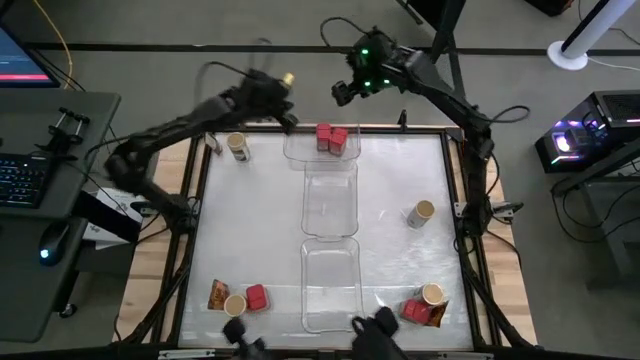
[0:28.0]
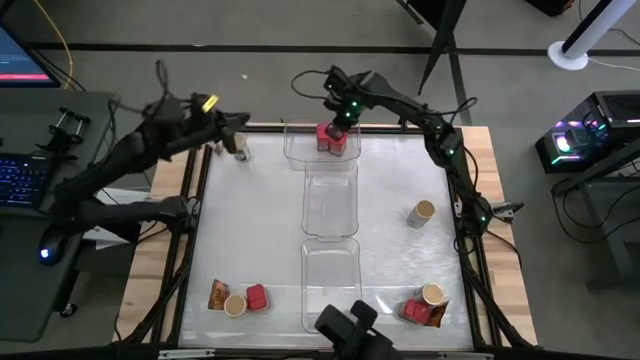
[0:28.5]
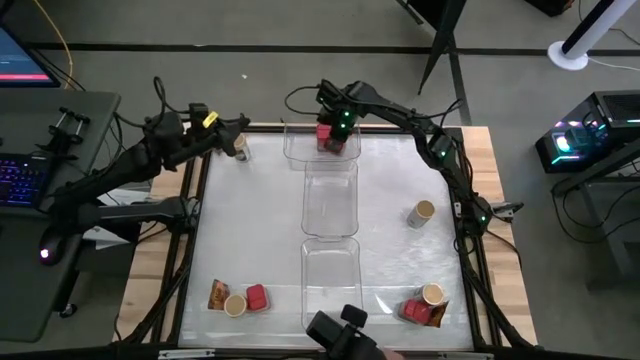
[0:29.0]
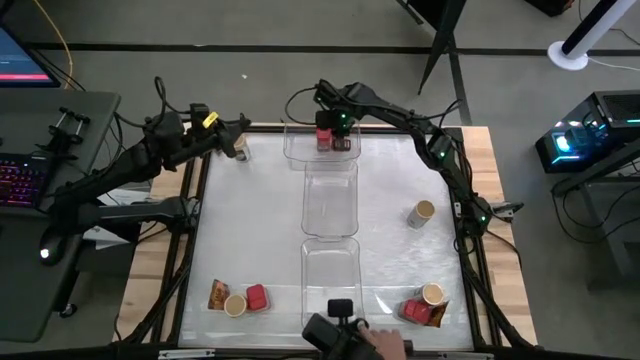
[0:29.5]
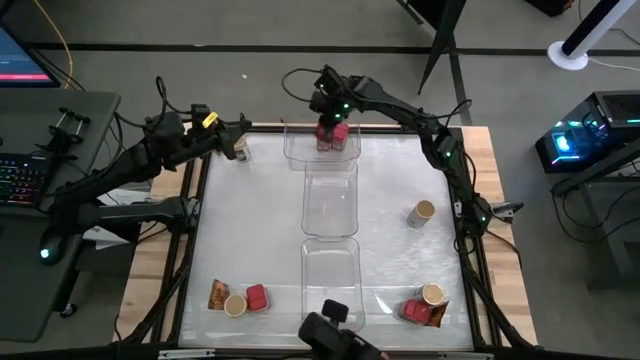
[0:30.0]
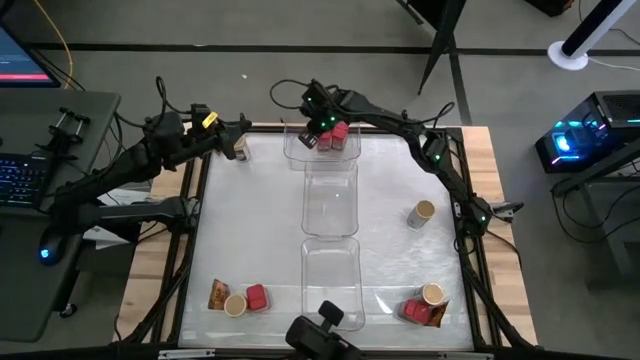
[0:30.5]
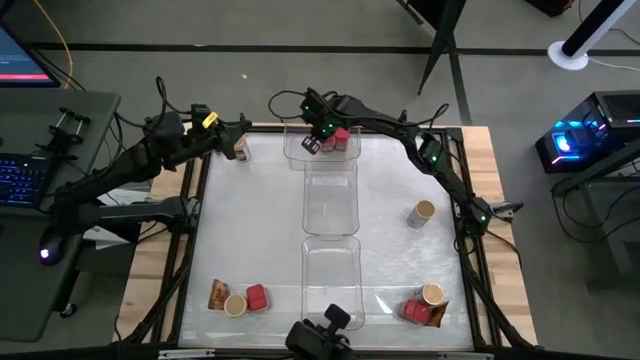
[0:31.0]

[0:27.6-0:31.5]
Task: Sort spices by type
Adjust the red seasoning cans in the top transparent bin

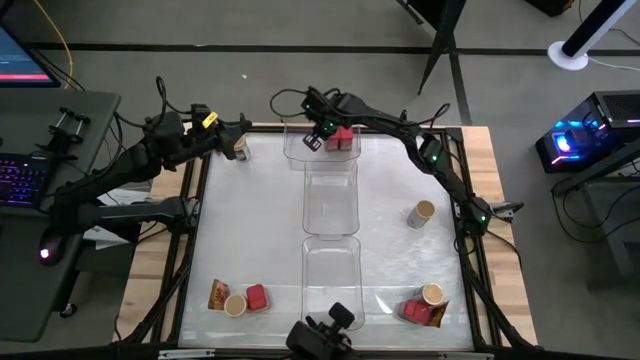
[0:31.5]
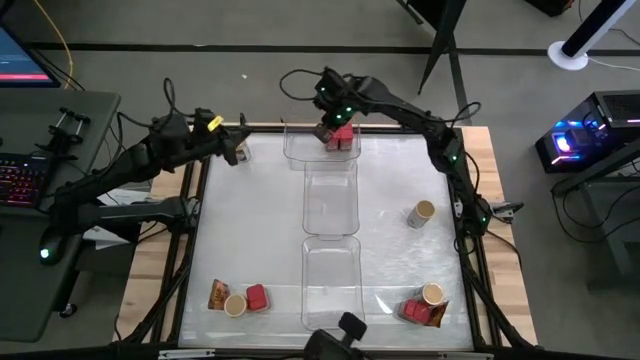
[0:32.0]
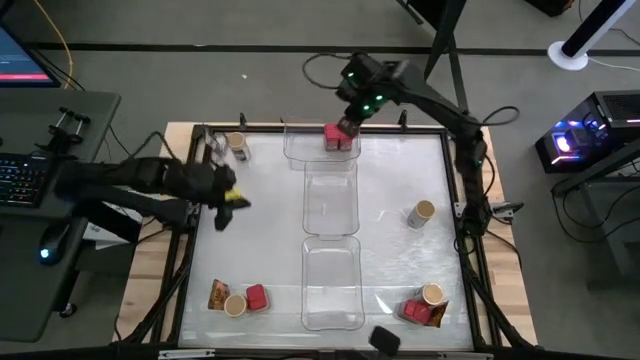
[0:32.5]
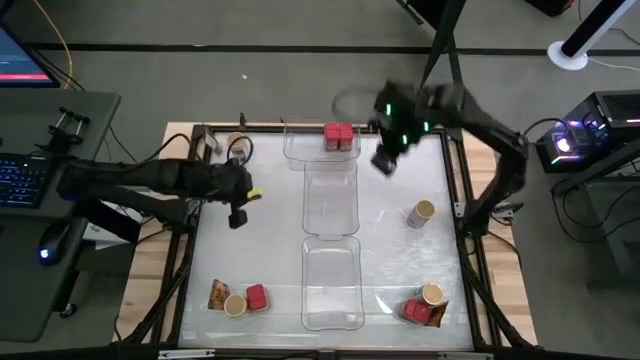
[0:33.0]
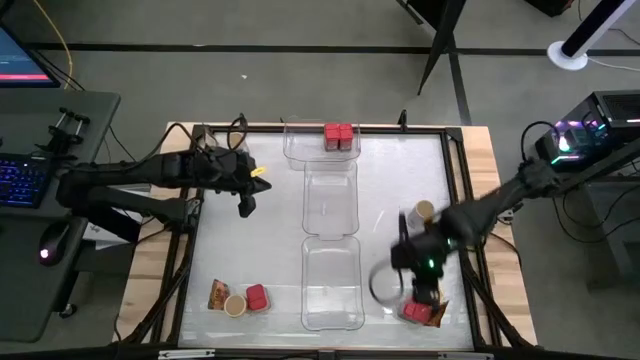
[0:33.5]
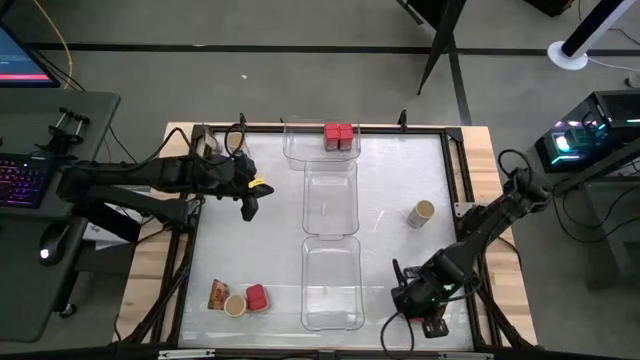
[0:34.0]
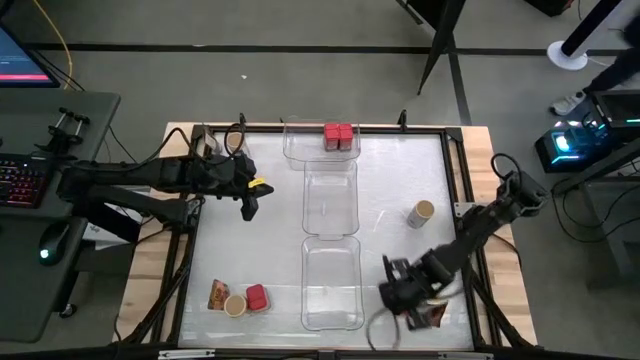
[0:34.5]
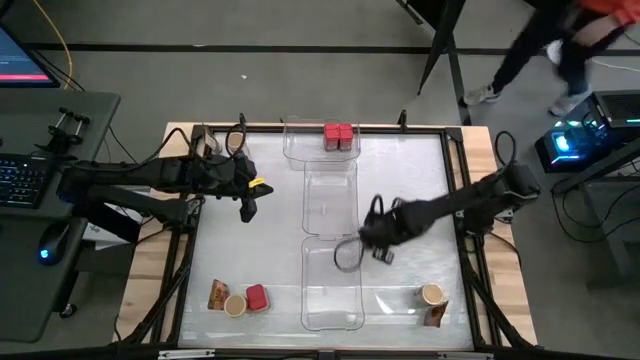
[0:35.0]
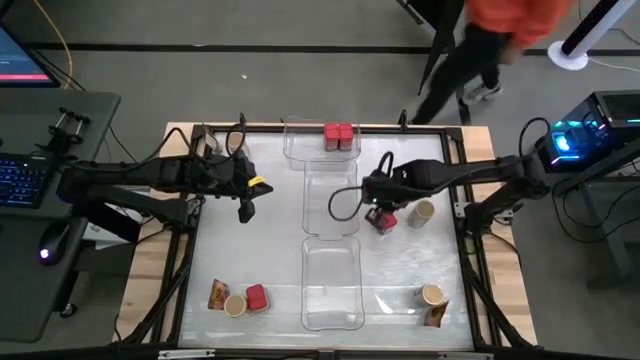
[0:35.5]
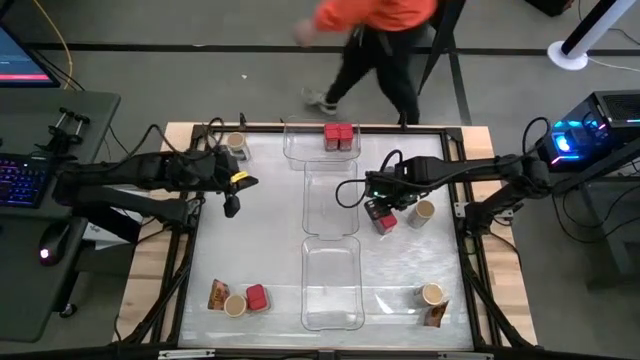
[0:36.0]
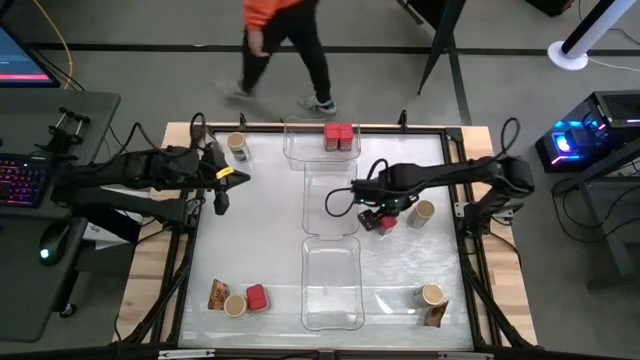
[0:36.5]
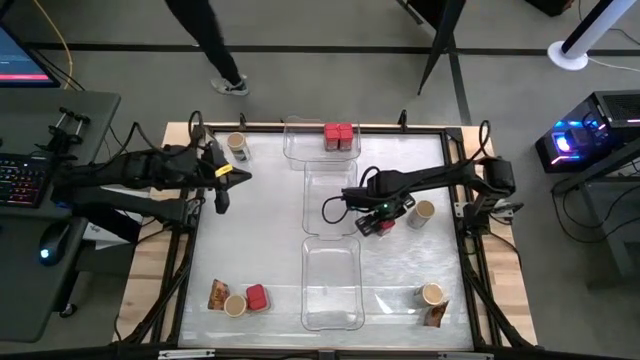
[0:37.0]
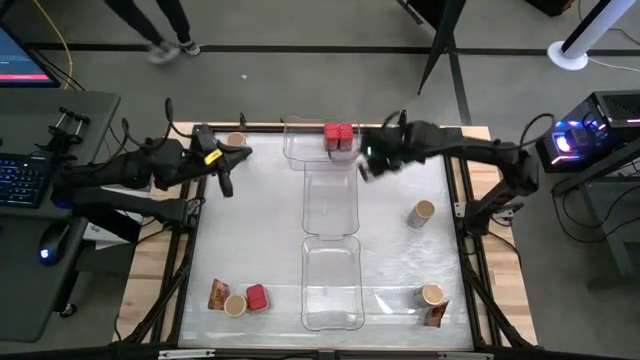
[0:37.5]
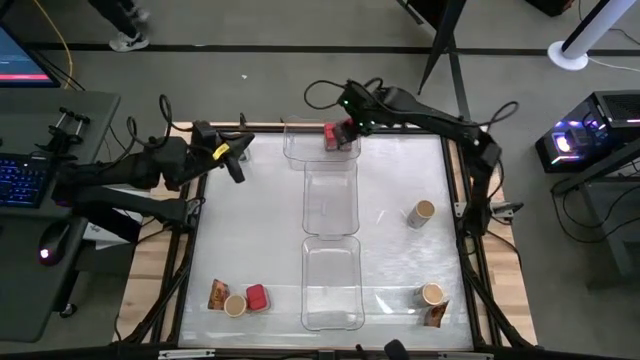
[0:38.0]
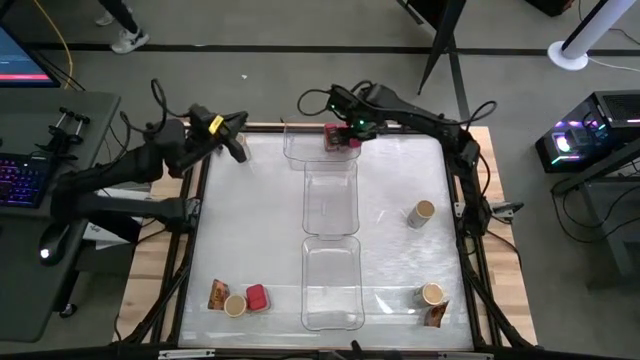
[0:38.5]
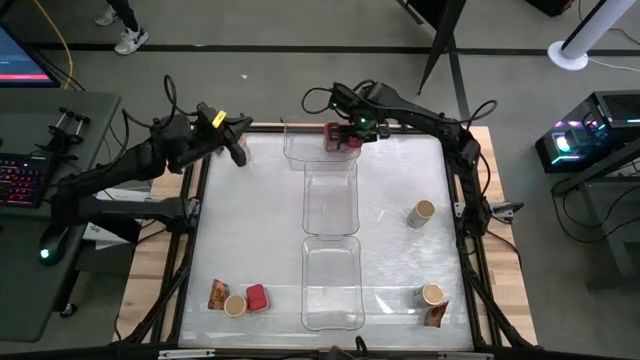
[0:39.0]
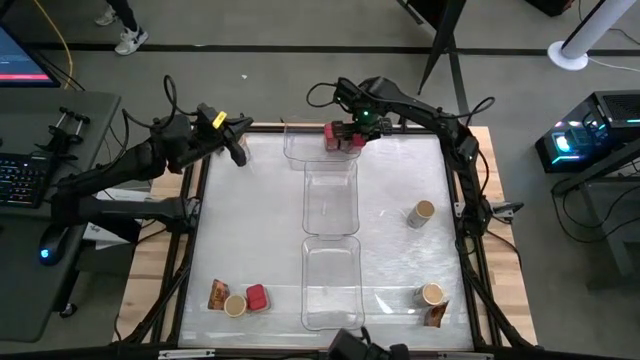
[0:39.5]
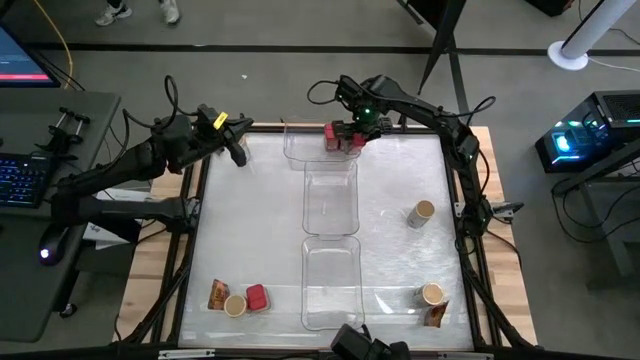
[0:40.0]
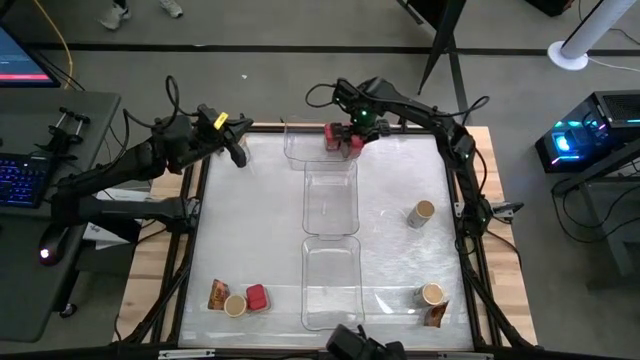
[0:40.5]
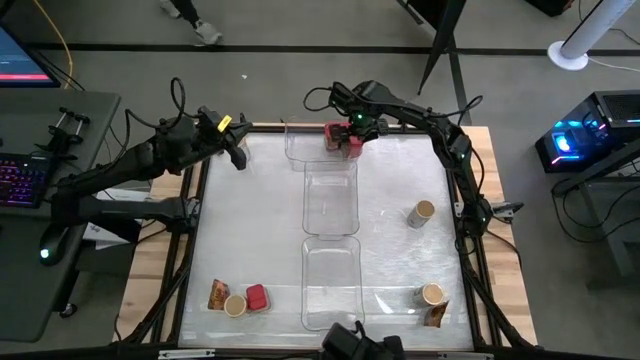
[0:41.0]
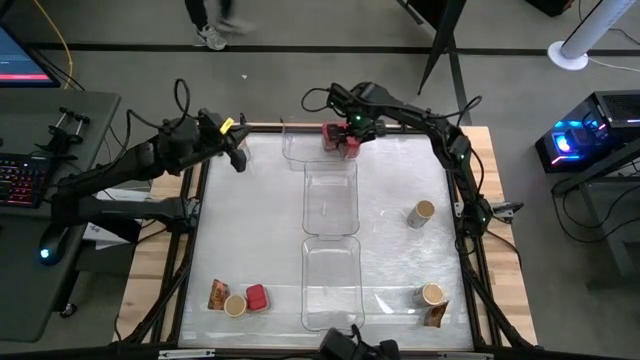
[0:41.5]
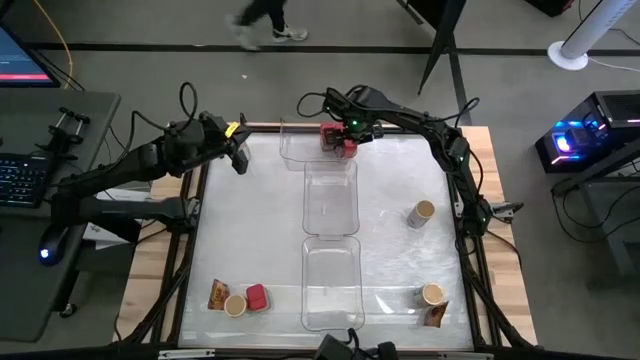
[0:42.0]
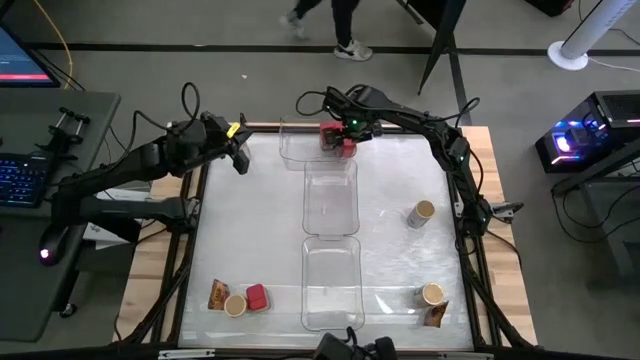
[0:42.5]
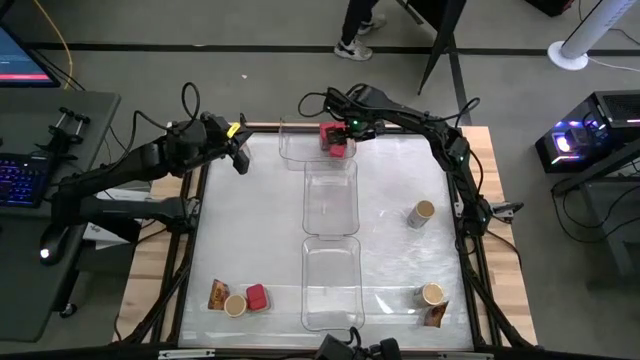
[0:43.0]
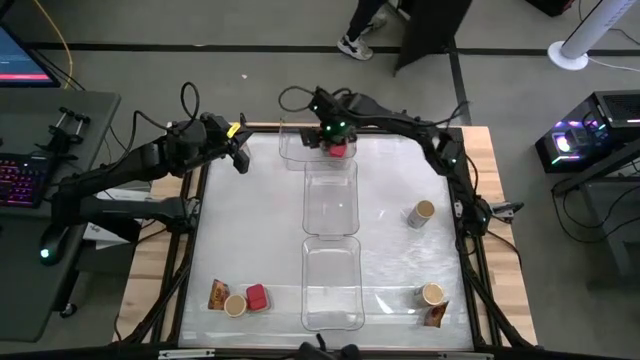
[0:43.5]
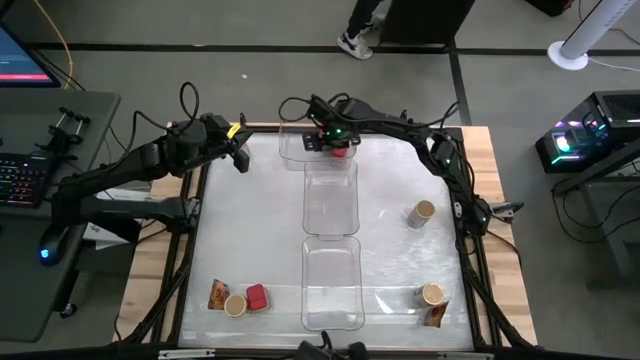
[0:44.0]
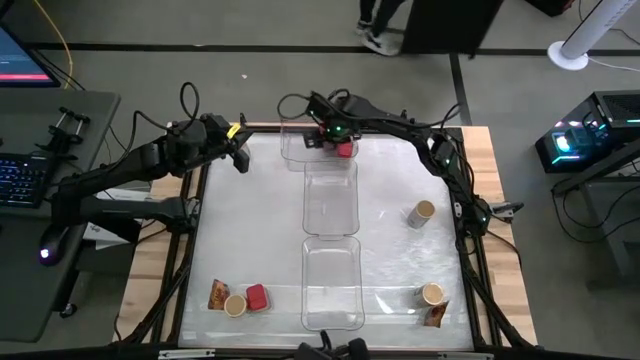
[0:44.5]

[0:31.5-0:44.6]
Put the right red seasoning can into the top transparent bin

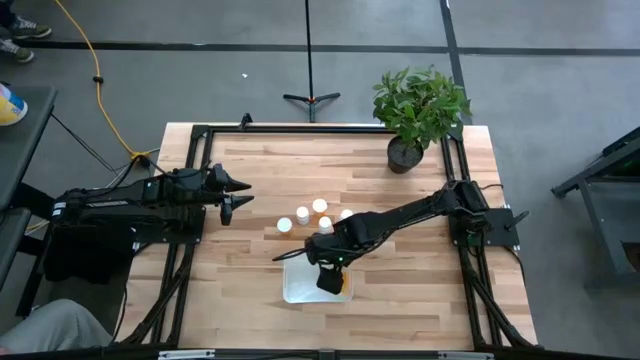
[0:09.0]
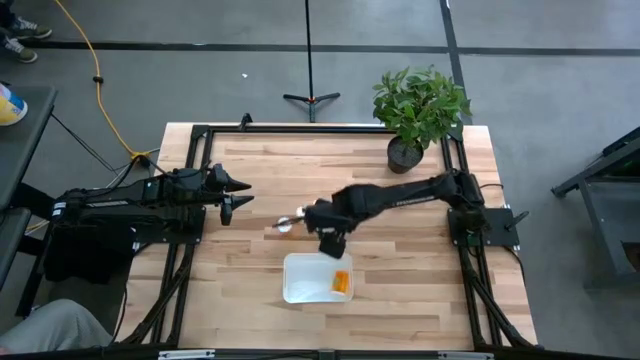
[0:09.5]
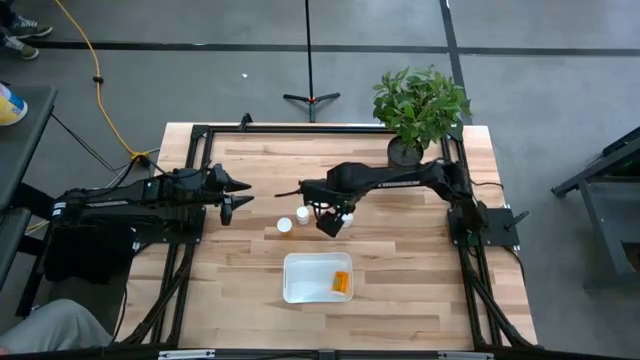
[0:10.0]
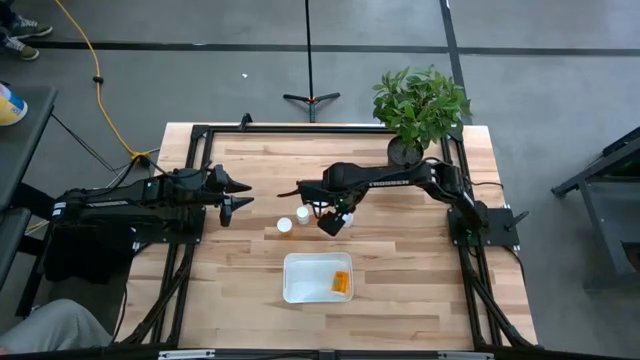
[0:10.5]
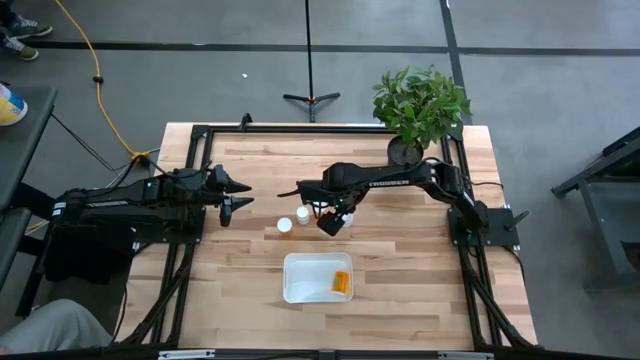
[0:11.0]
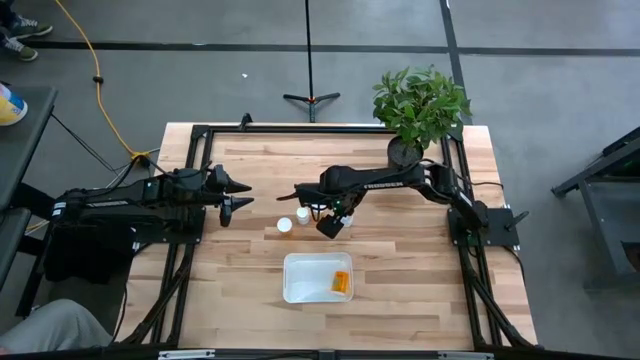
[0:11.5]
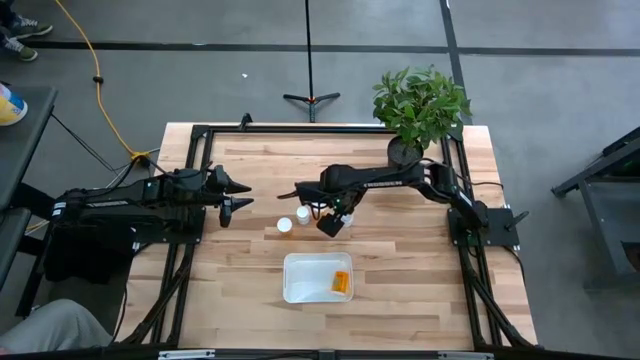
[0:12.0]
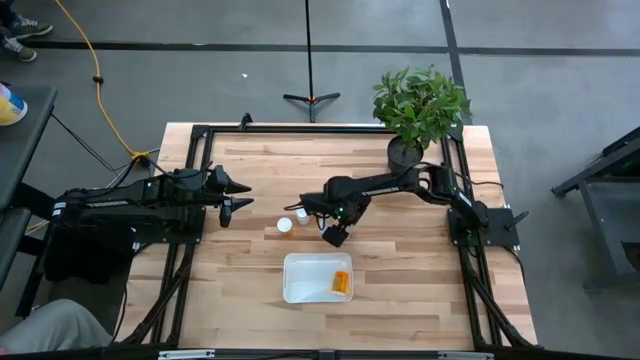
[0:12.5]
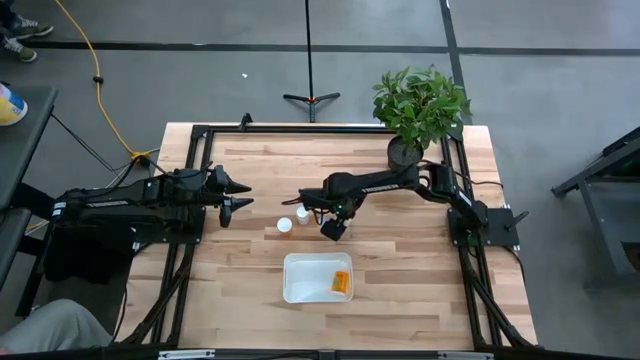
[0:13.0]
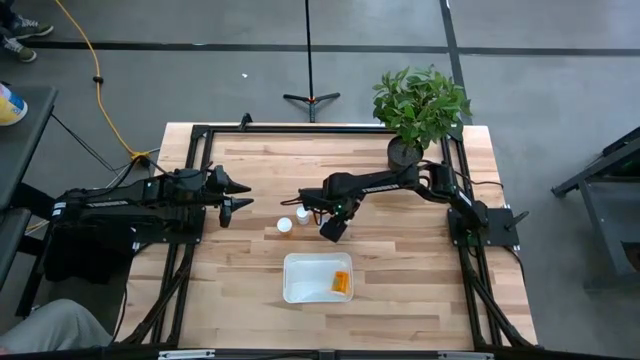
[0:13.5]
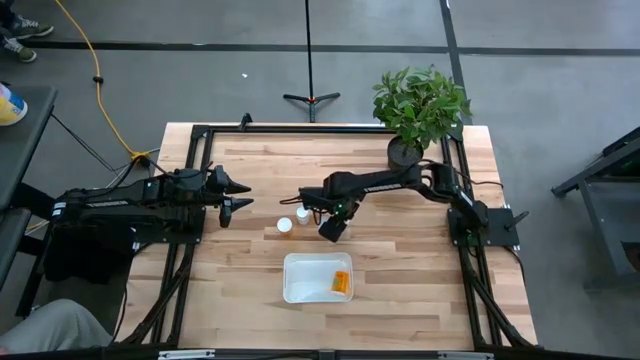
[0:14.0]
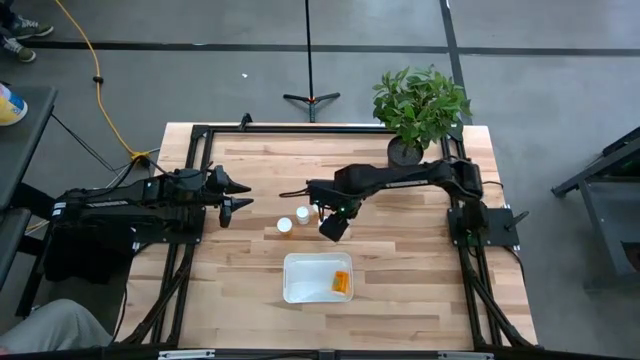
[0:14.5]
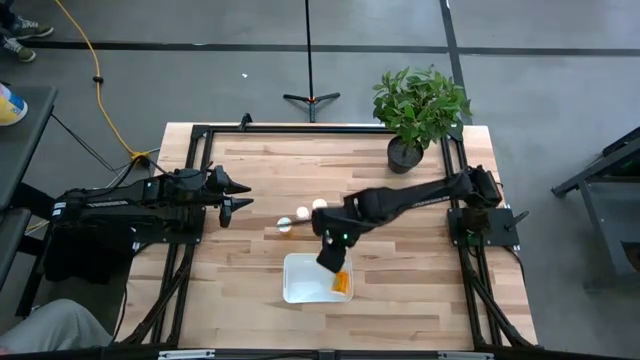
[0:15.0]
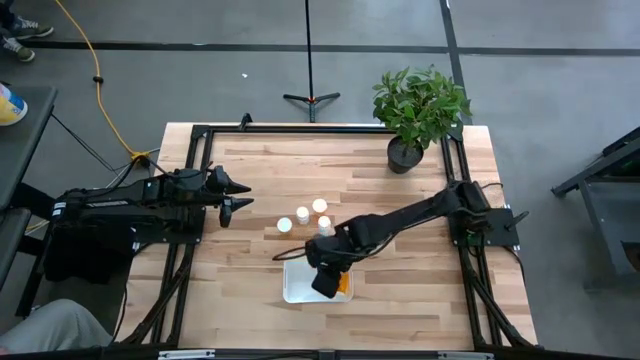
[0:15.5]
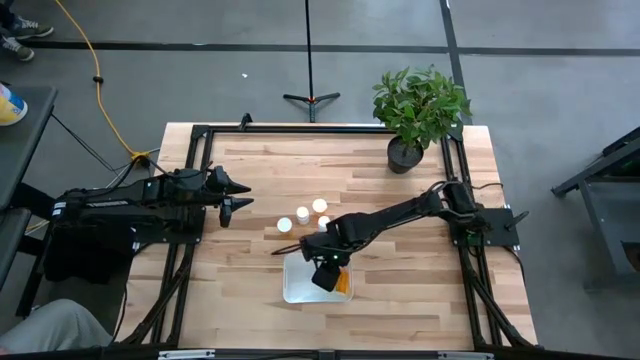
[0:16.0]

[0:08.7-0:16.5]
Task: Pick and place pill bottles into a basket
Put the bottom right white pill bottle into the white bin
